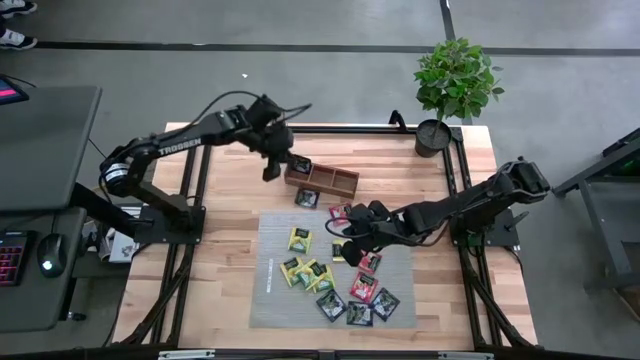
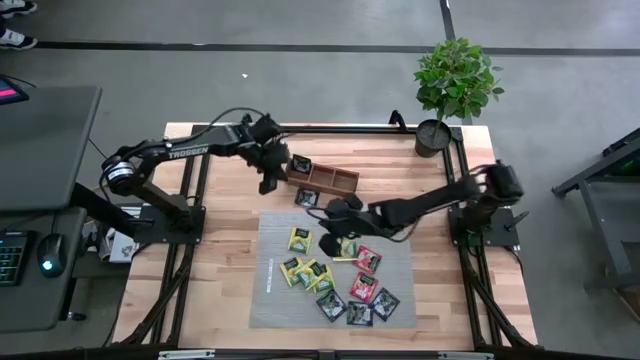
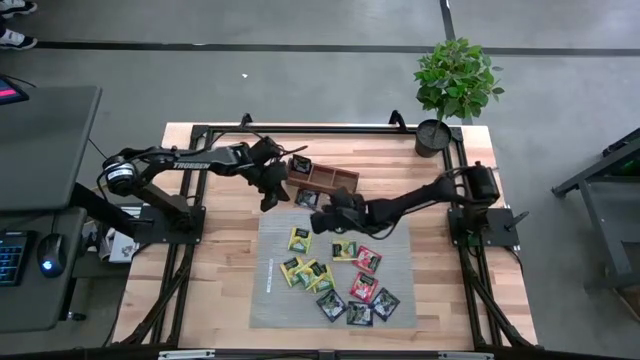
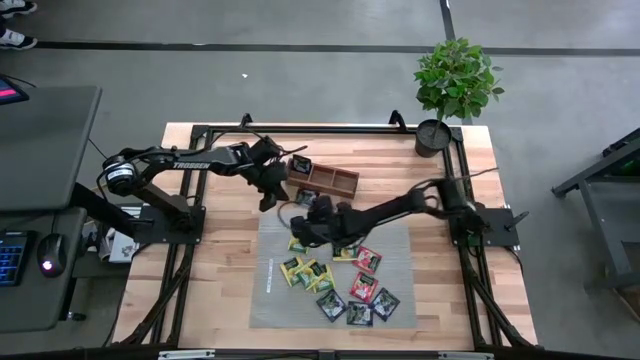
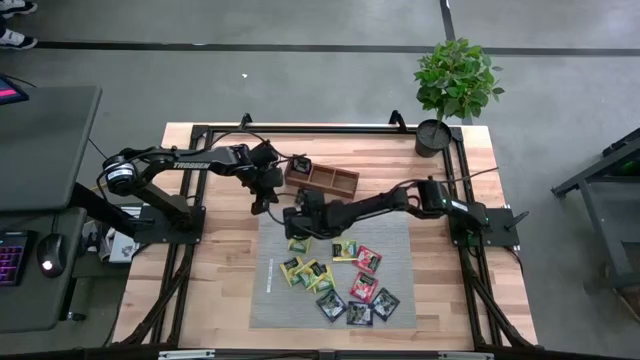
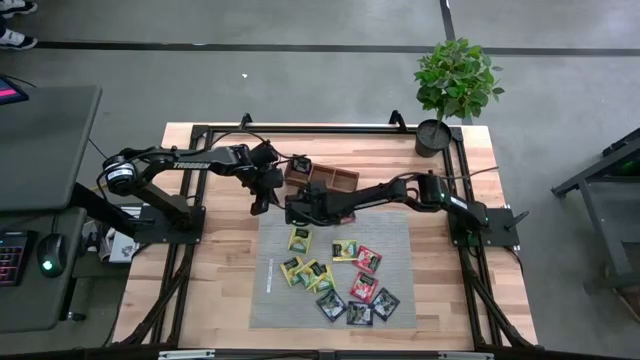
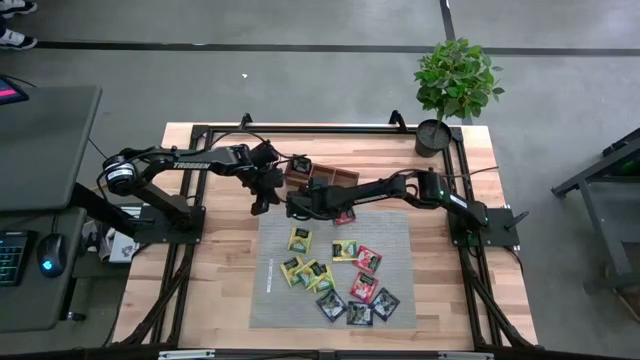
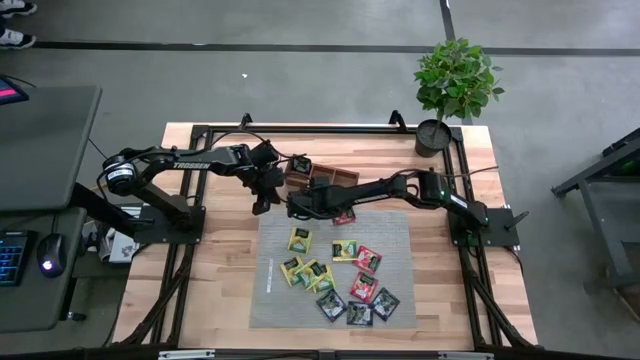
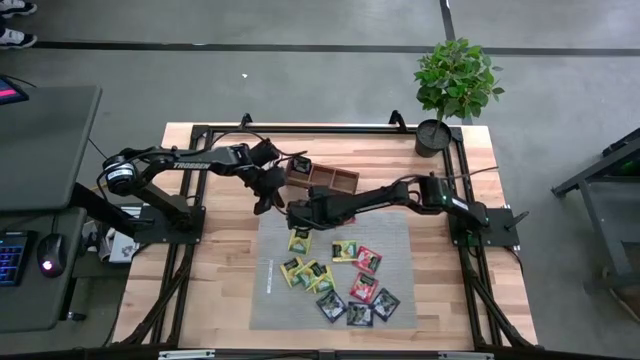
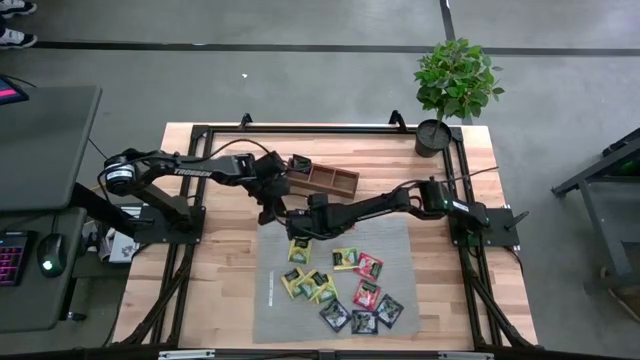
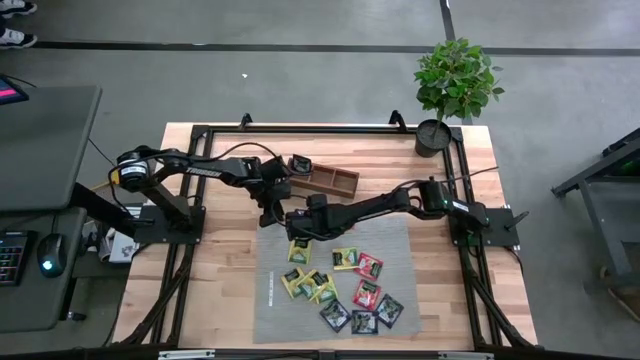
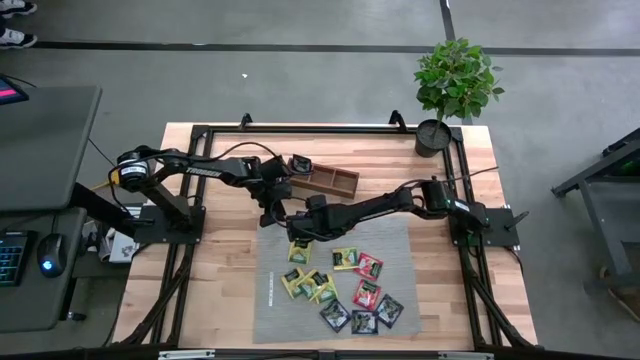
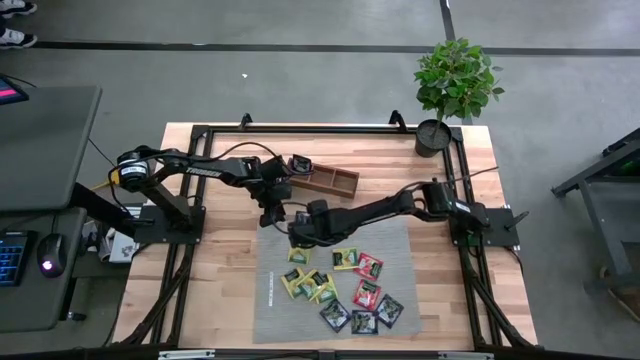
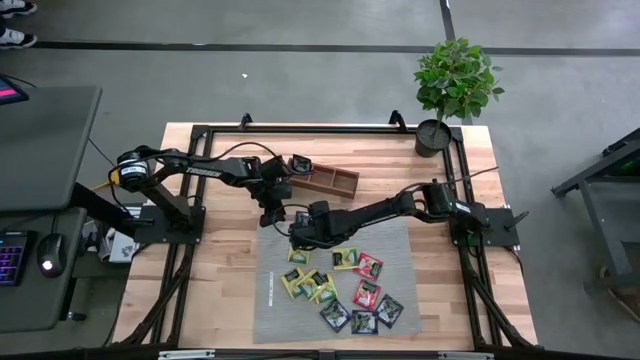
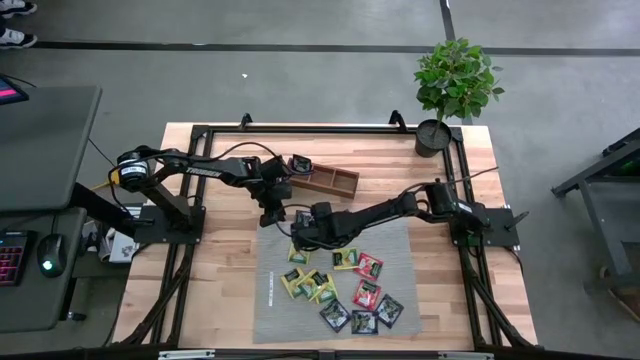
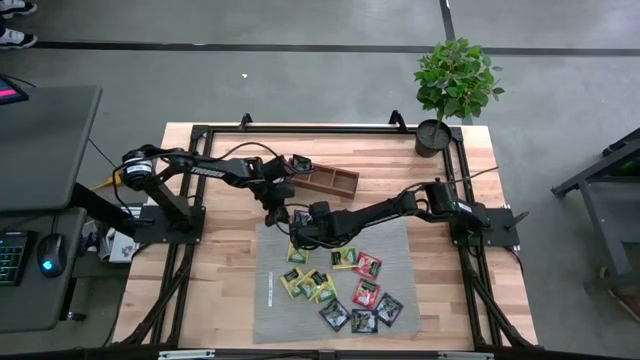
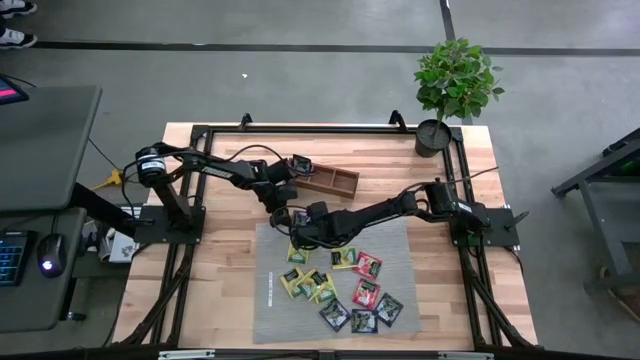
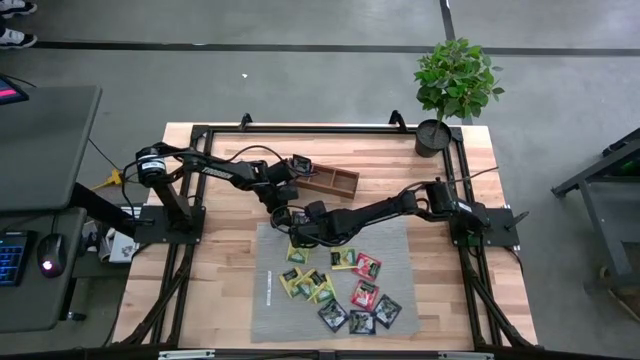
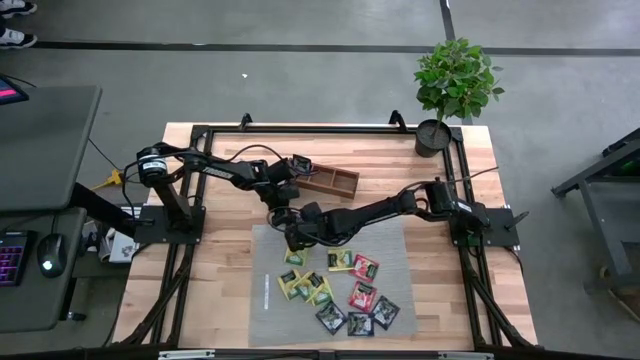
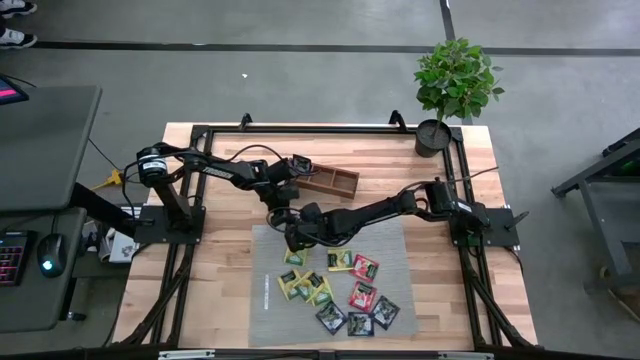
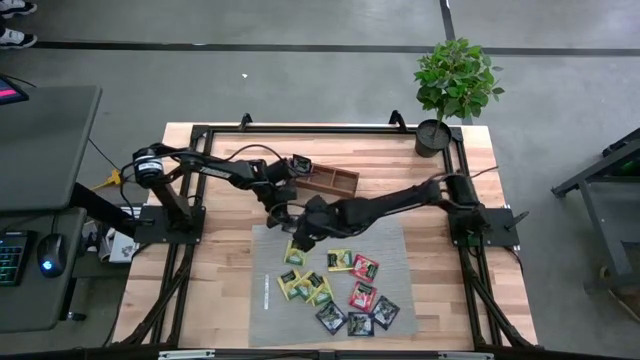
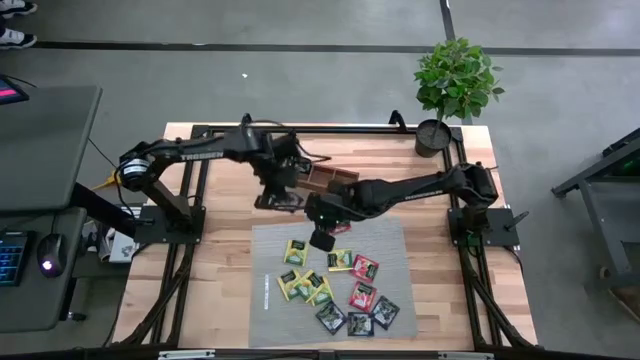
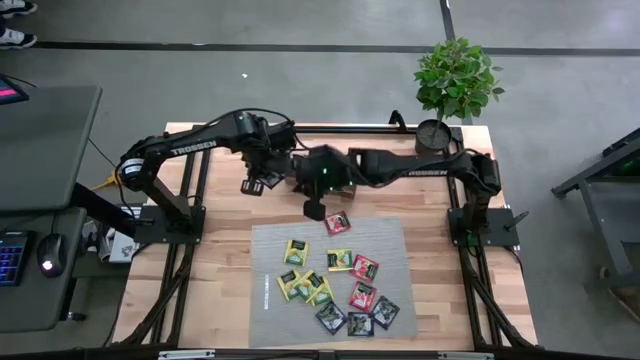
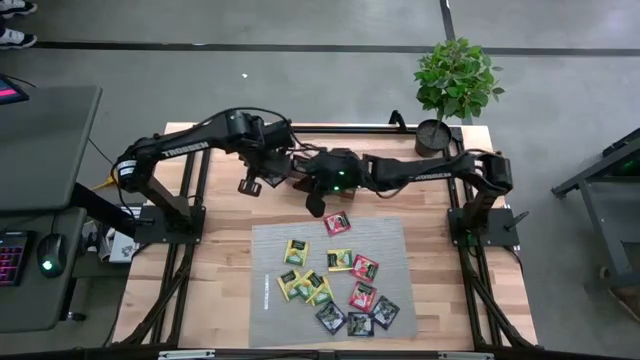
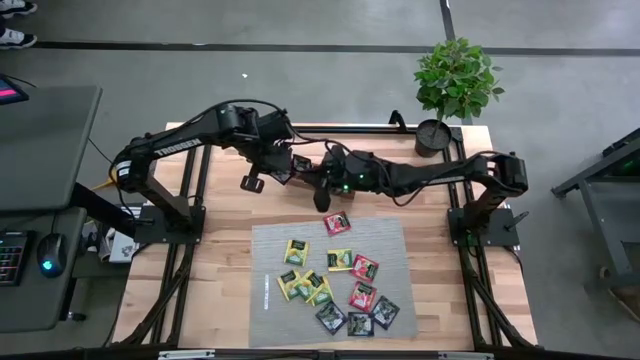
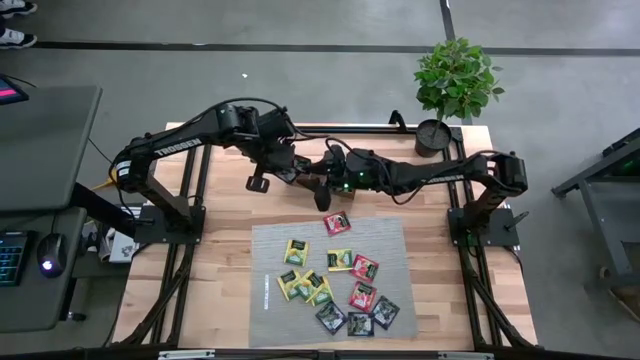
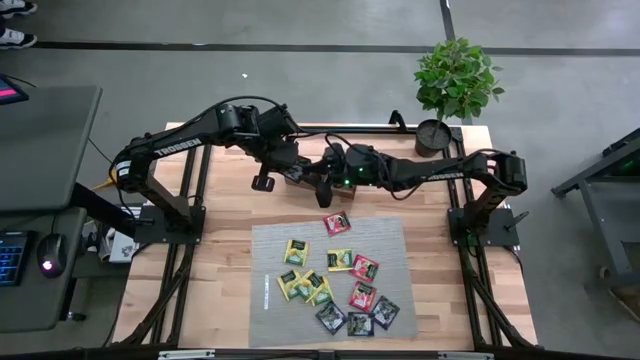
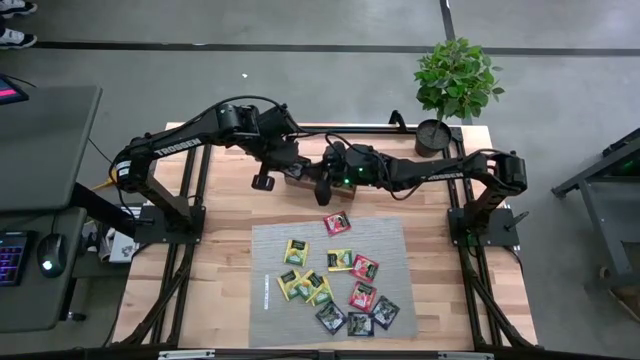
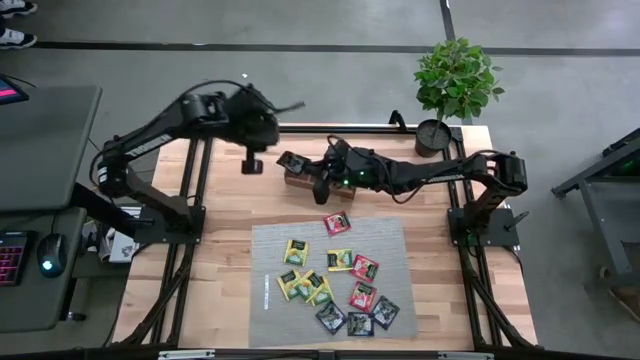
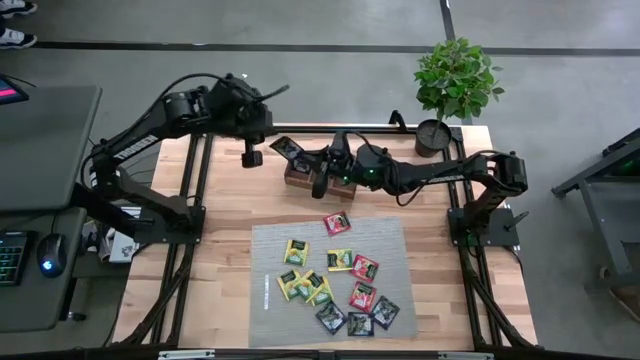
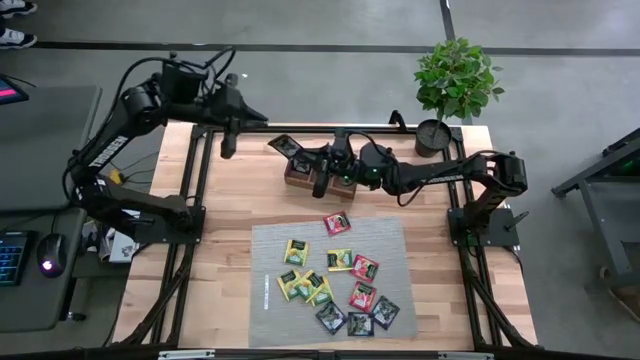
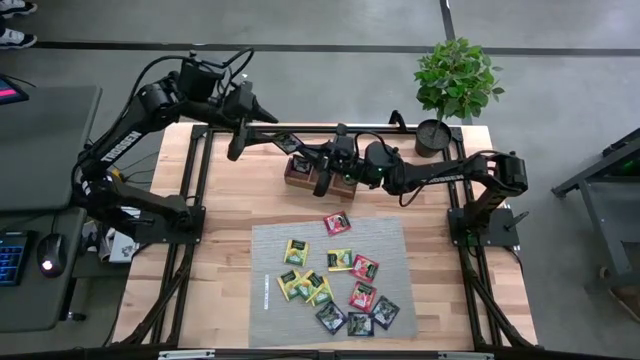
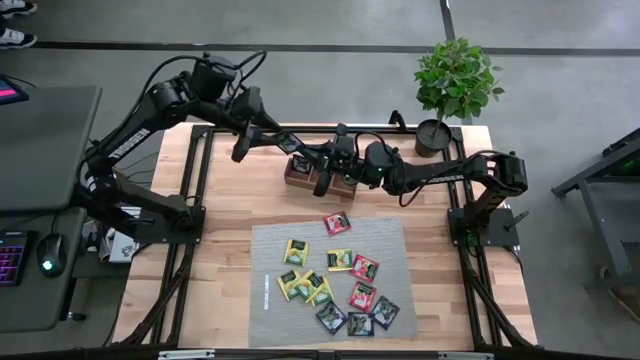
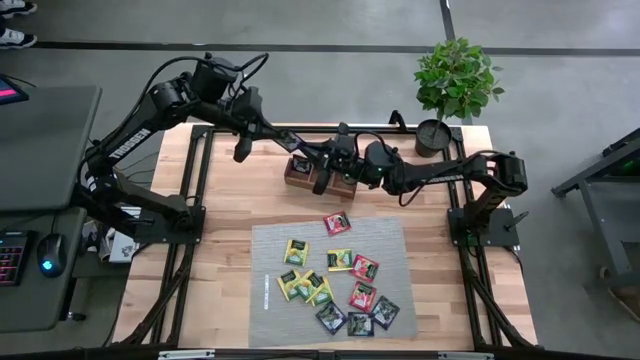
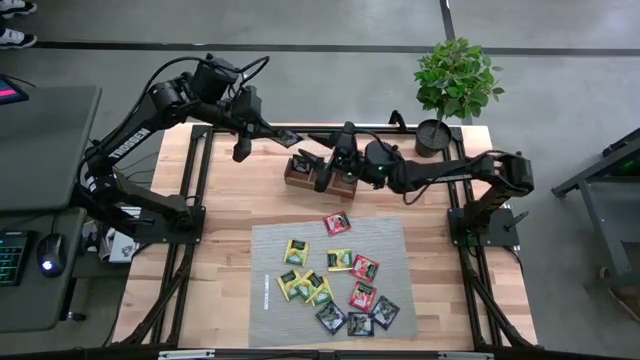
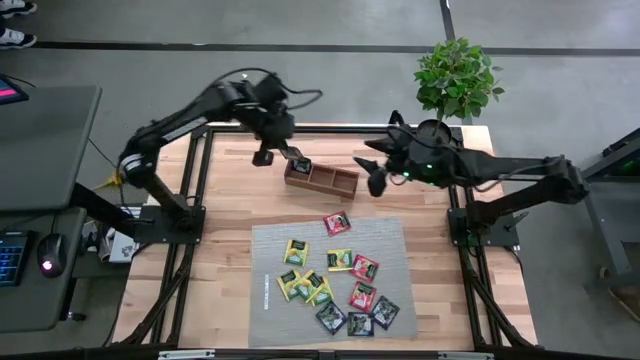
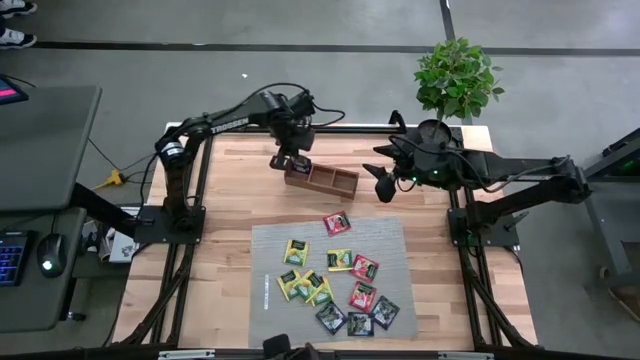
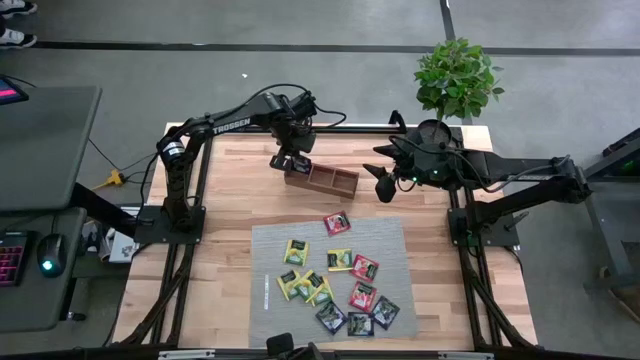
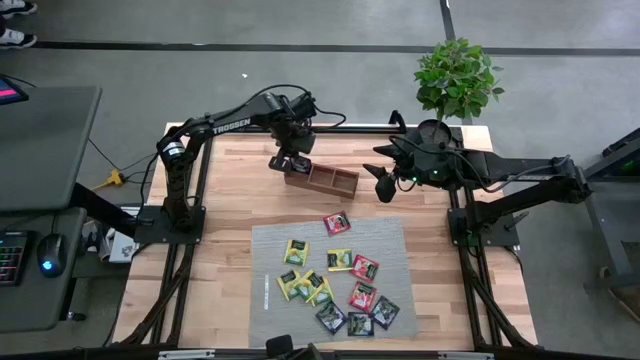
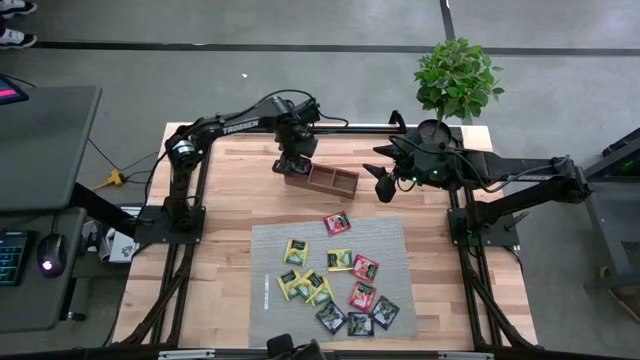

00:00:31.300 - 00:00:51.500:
Task: Pick & Place Tea
Put the purple tea bag into the left section of the wooden organizer
